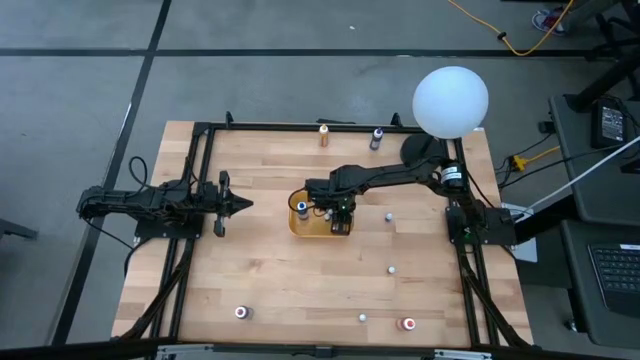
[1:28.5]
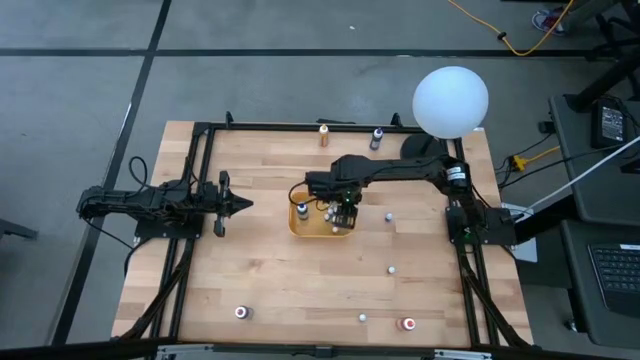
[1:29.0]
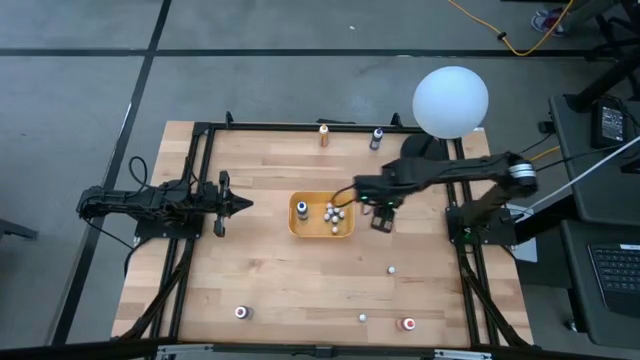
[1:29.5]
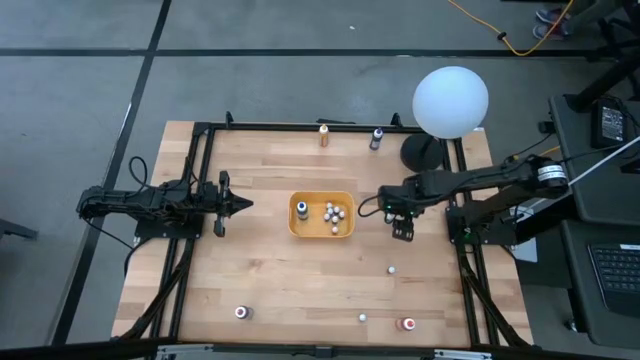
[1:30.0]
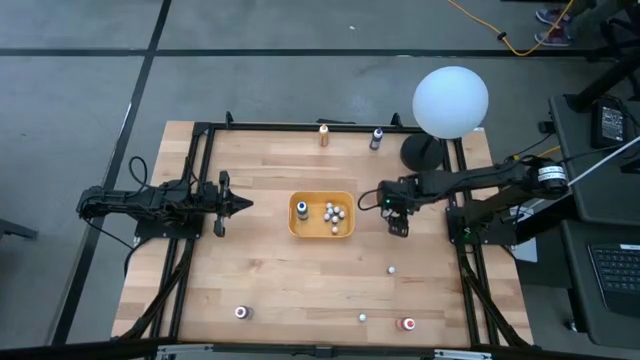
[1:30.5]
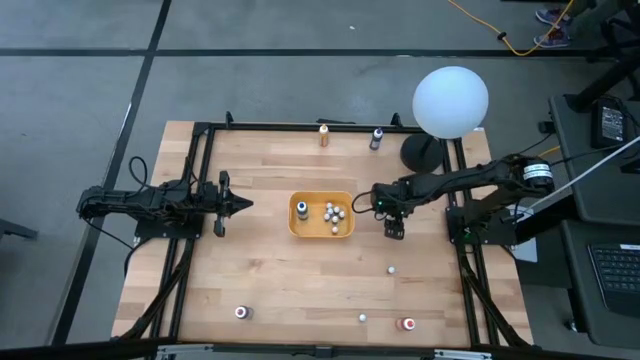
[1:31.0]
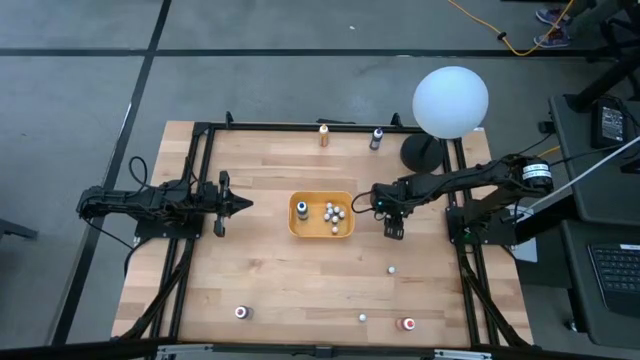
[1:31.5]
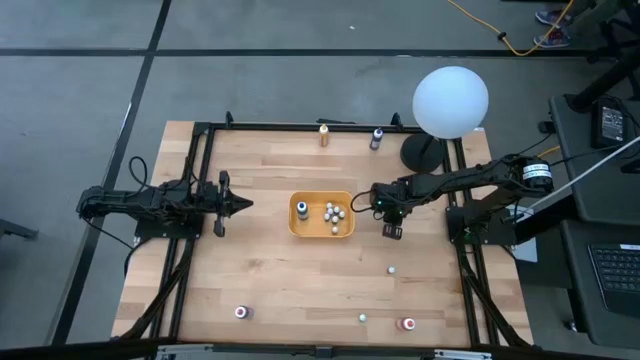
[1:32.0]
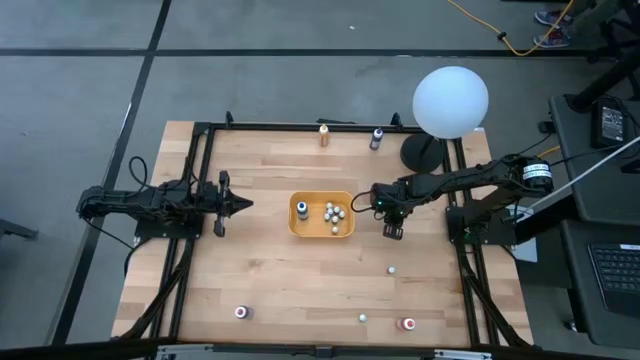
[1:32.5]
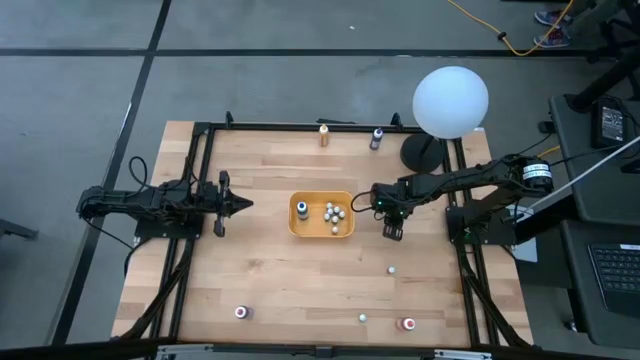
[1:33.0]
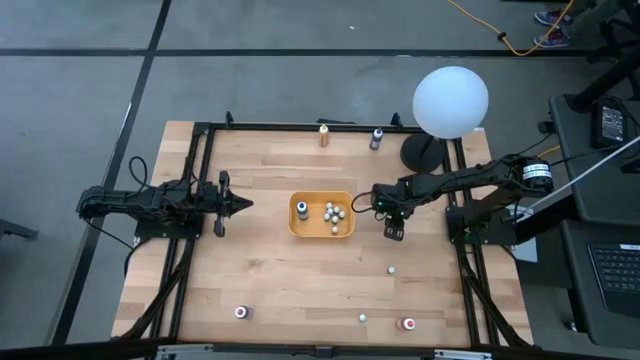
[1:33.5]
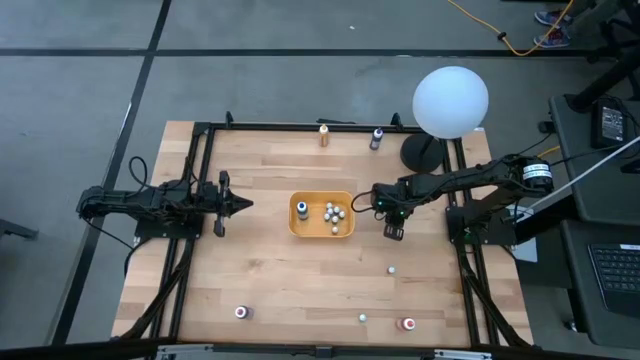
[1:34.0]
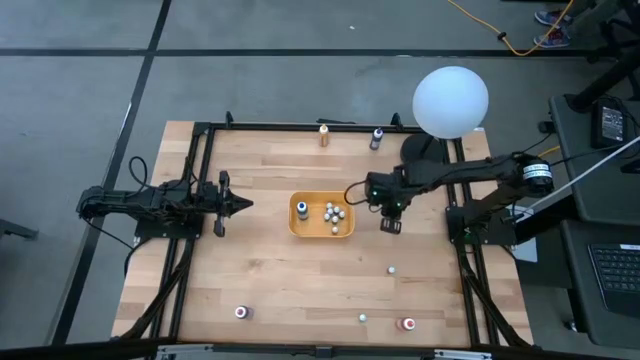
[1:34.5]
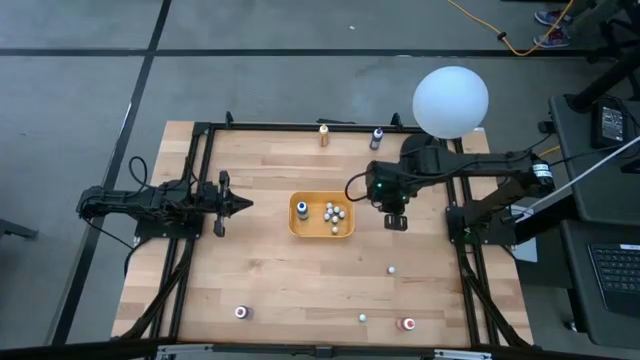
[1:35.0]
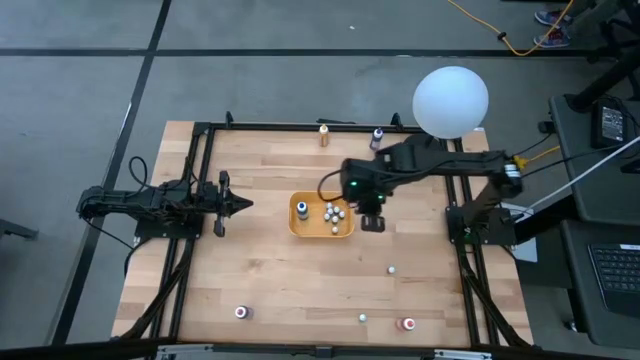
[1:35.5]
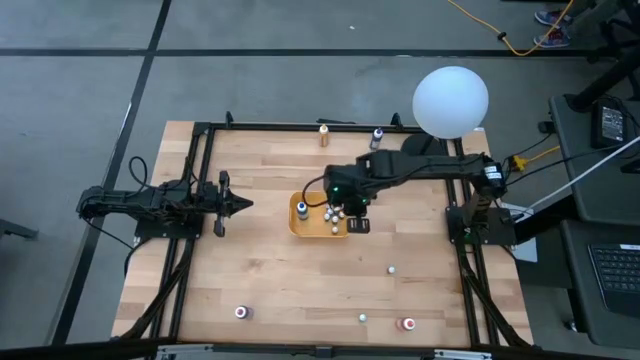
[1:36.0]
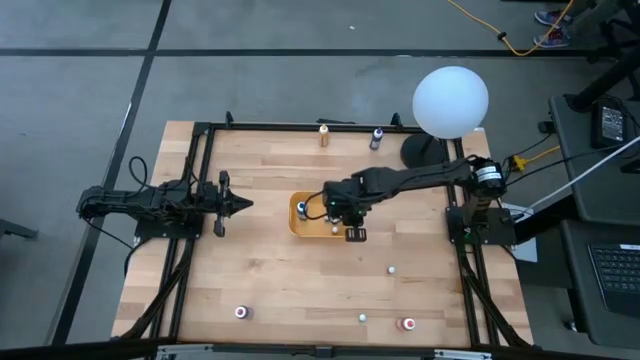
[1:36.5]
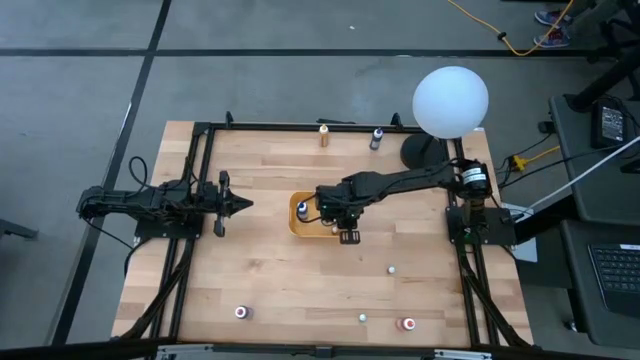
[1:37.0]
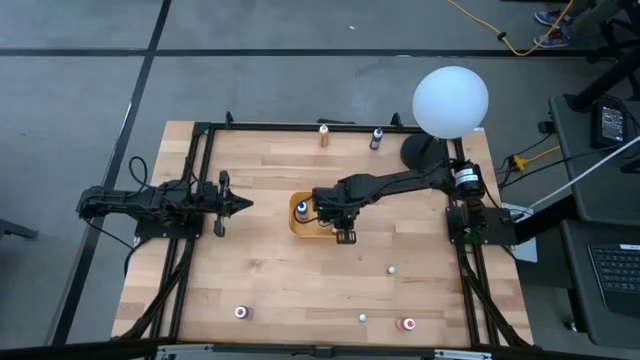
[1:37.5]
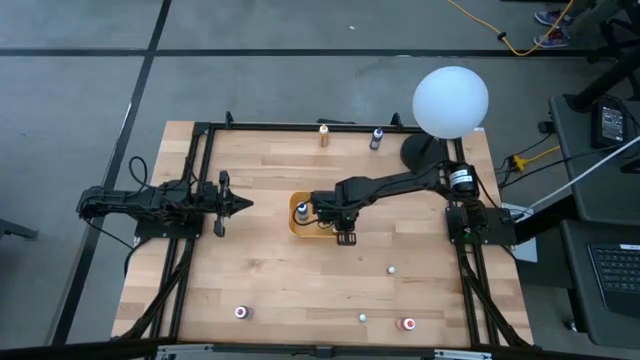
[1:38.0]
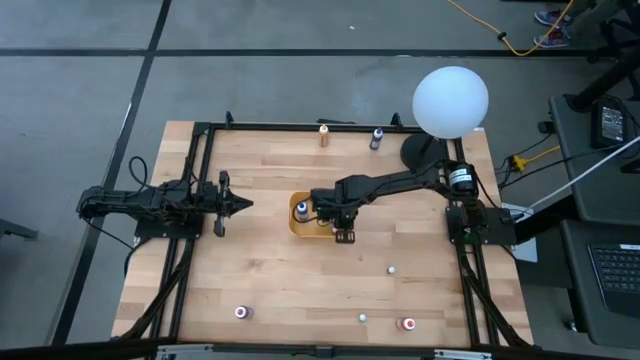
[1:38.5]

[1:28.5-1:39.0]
Task: Pick & Place food coloring
Put the black food coloring bottle into the yellow bin

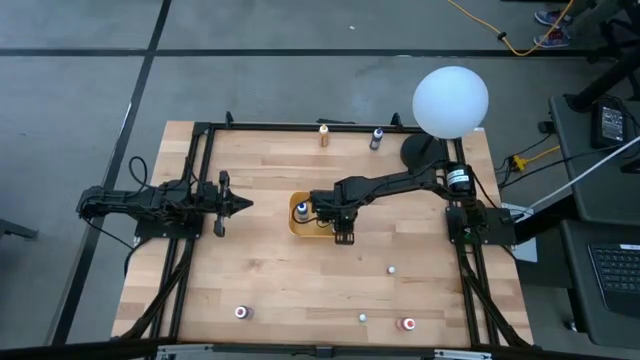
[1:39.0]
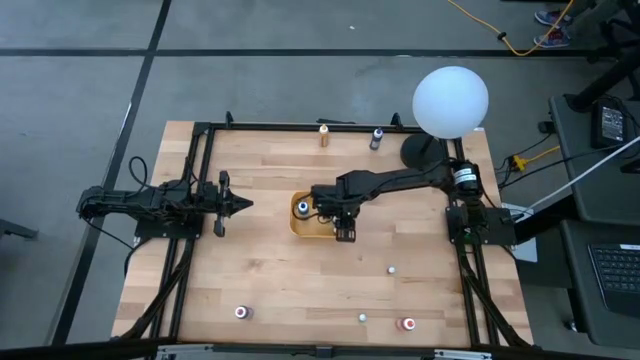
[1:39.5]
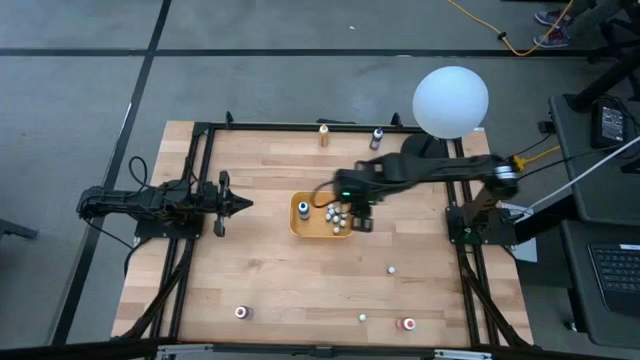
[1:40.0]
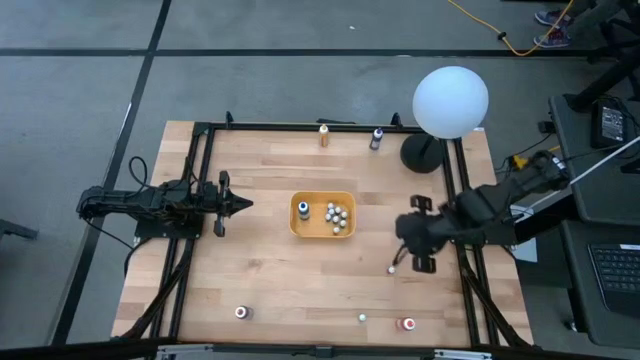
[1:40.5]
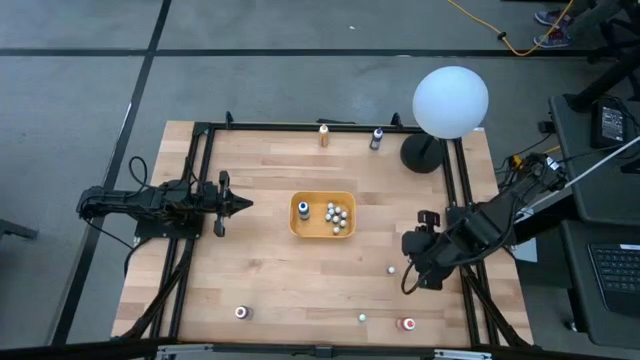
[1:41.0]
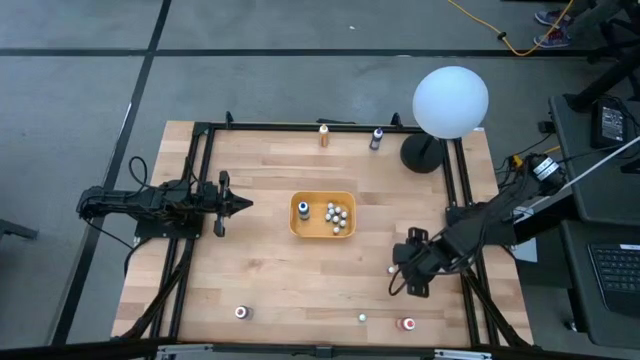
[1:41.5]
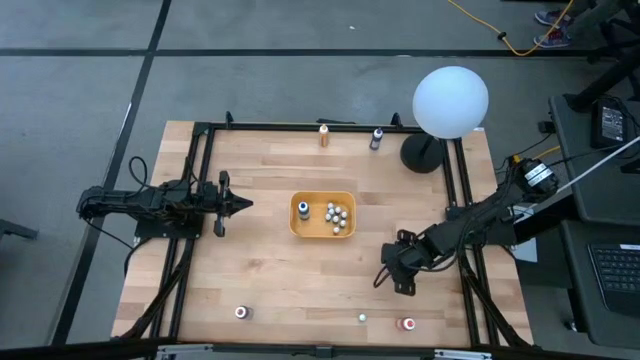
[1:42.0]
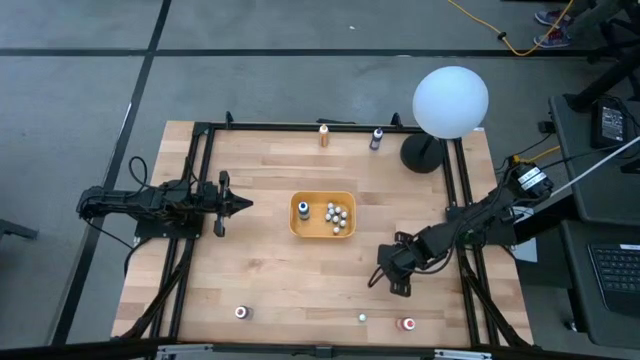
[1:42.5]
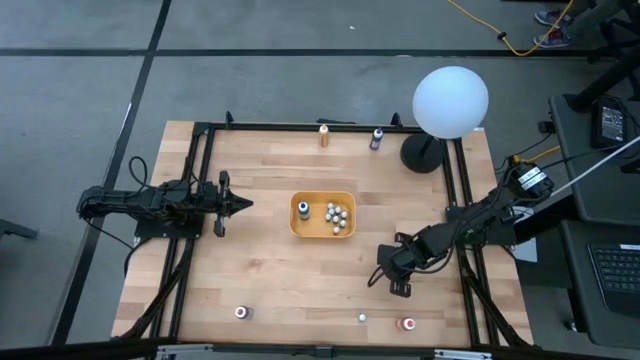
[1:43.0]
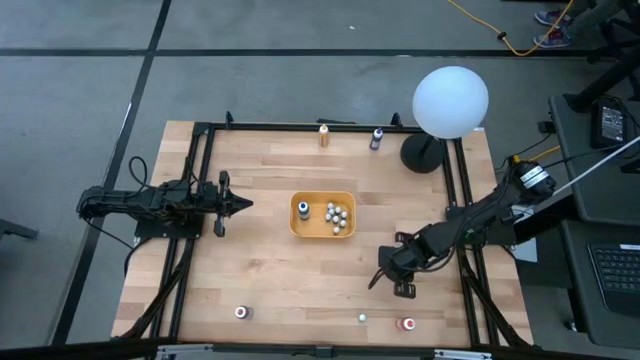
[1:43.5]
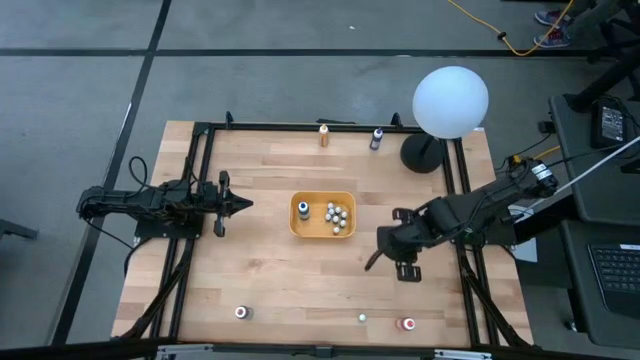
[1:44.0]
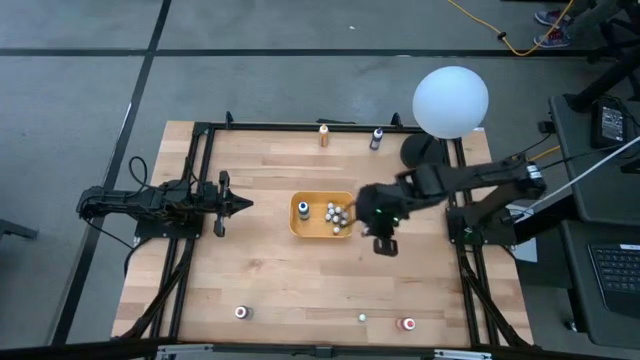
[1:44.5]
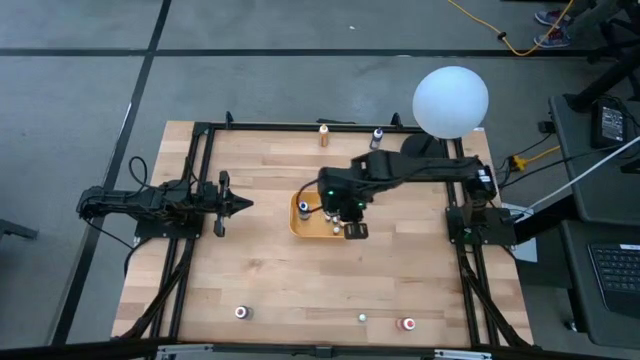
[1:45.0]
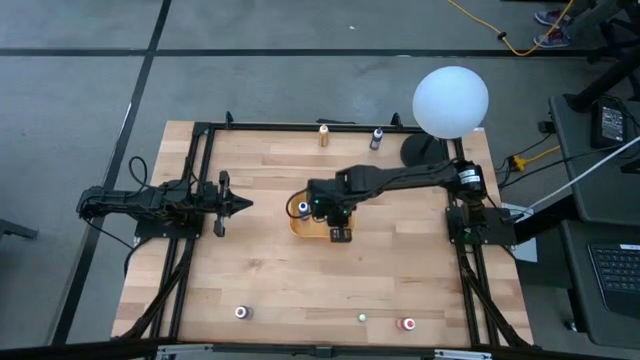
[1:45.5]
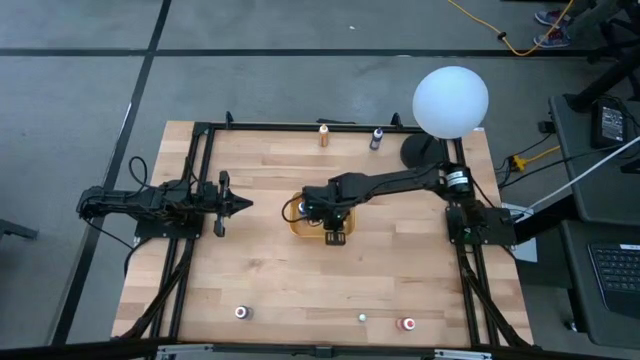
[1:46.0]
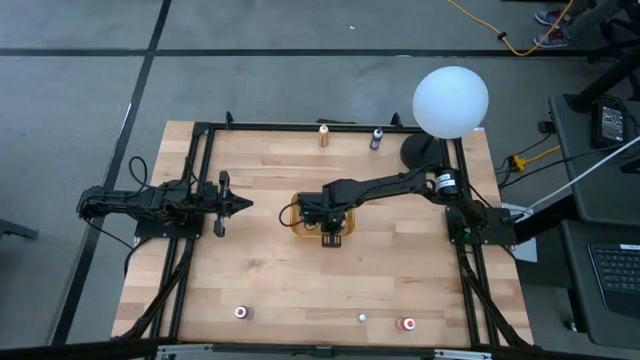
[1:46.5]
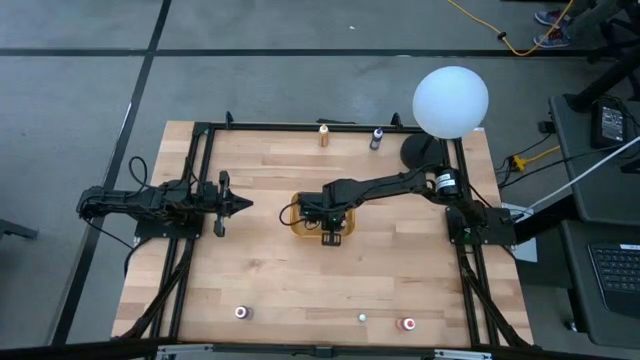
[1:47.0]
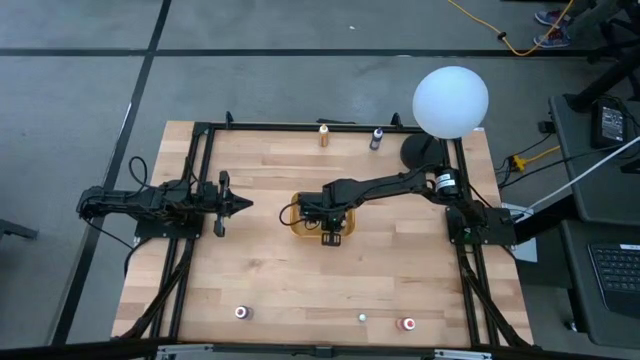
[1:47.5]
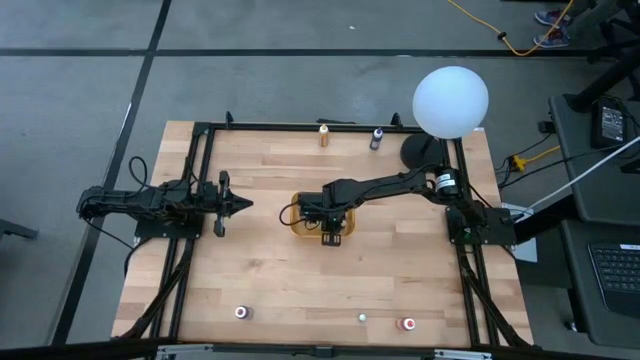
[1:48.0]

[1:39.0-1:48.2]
Put the red food coloring bottle into the yellow bin

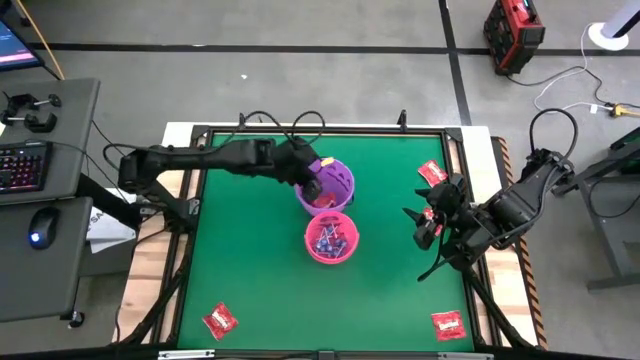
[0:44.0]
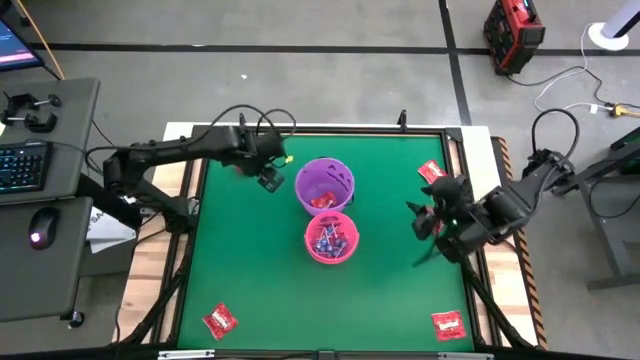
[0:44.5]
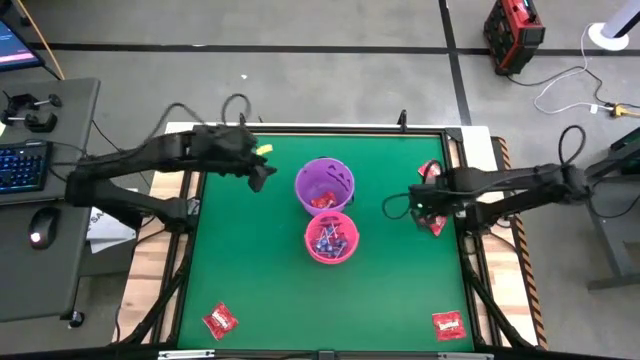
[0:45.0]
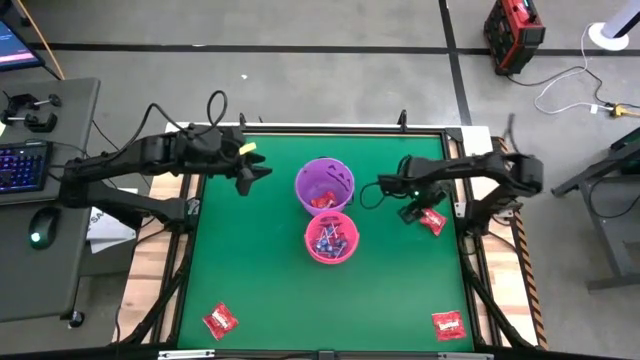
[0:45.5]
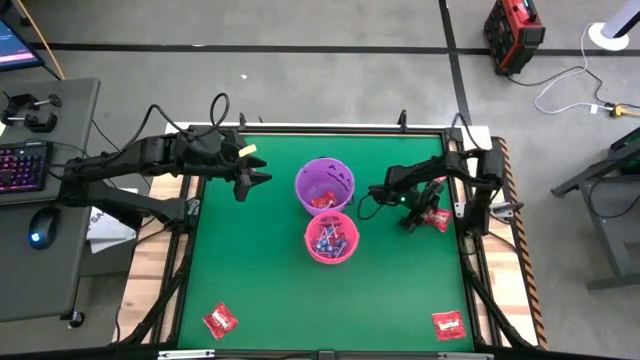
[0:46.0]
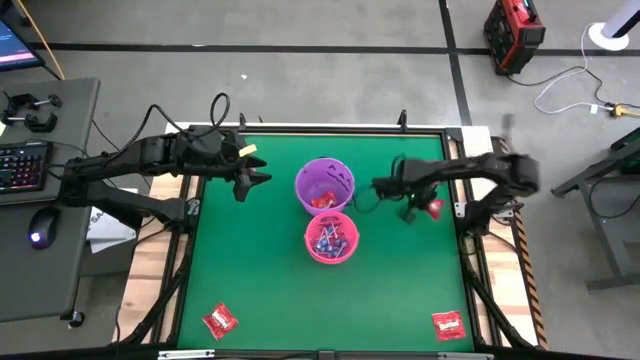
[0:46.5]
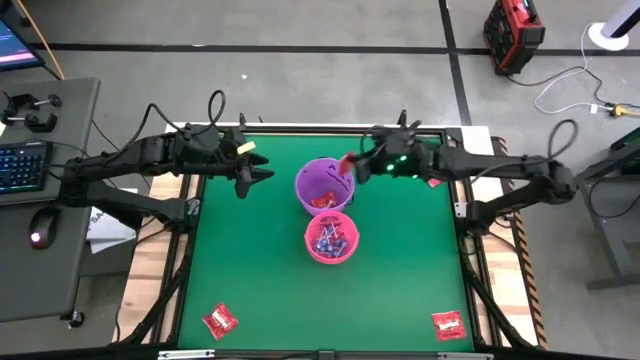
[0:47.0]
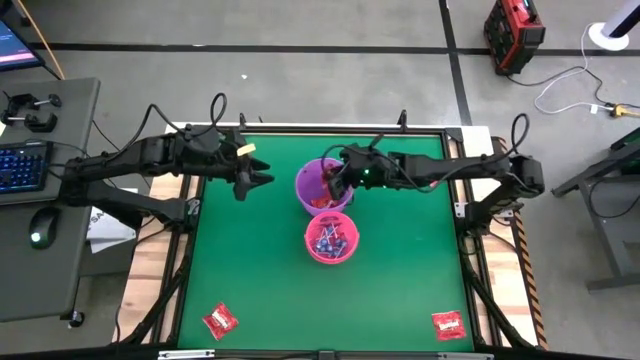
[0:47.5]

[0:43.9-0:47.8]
Task: Sort candy by brand, put in halloween buckets
Put the red candy into the purple bucket
